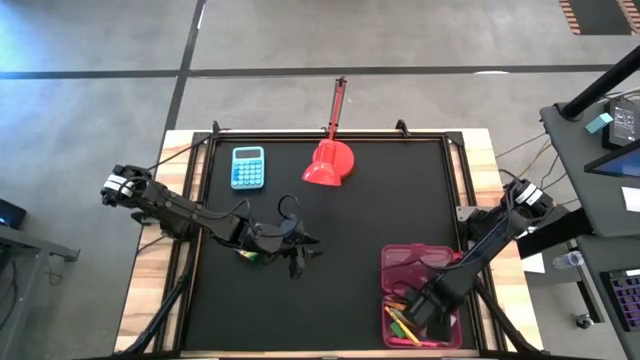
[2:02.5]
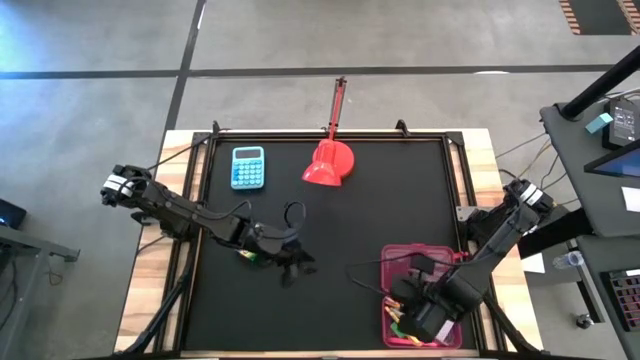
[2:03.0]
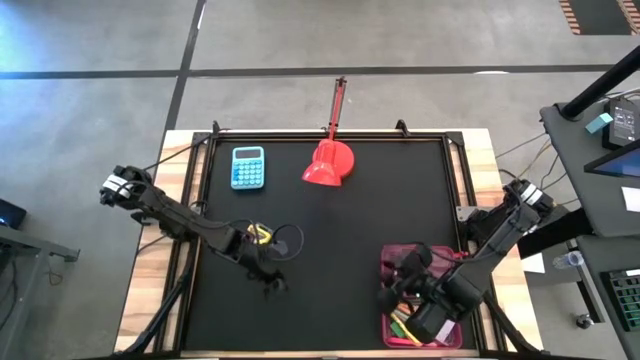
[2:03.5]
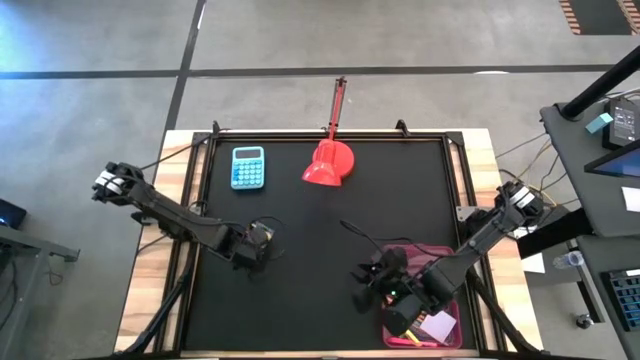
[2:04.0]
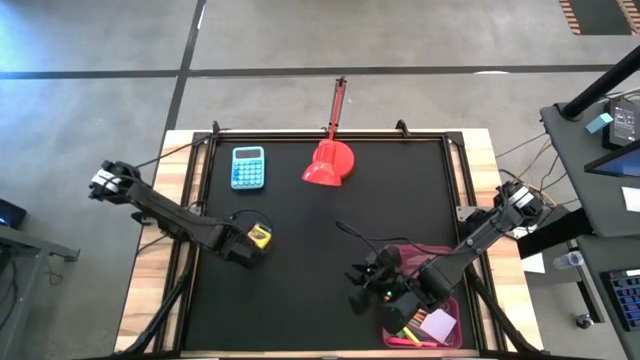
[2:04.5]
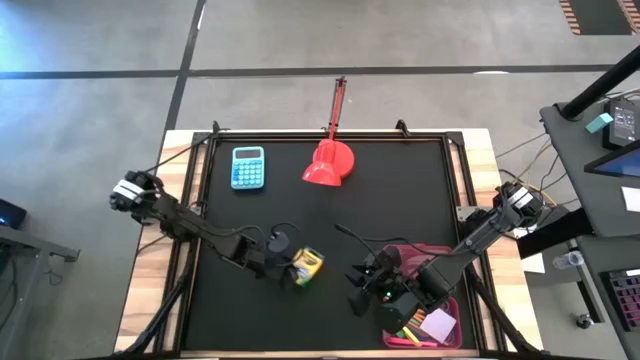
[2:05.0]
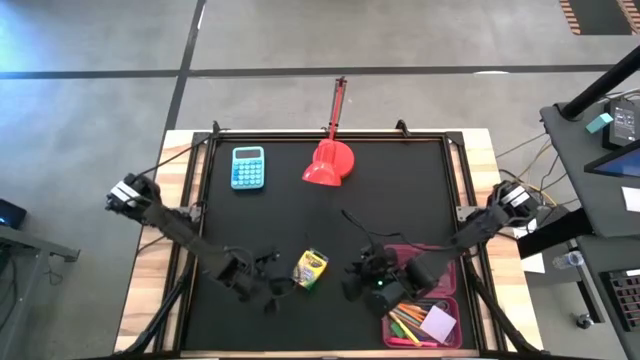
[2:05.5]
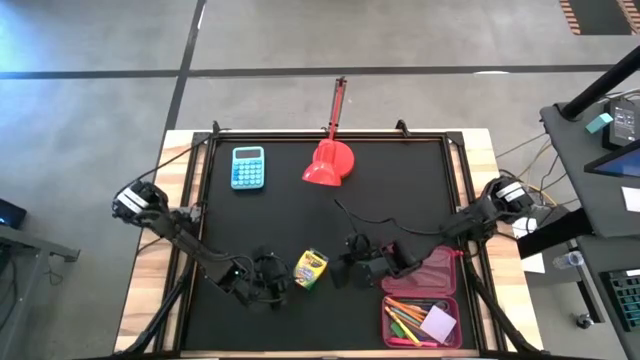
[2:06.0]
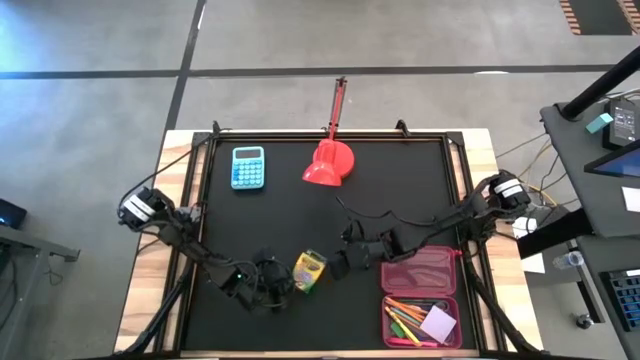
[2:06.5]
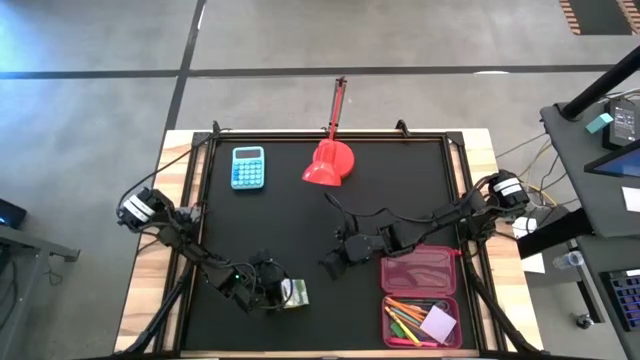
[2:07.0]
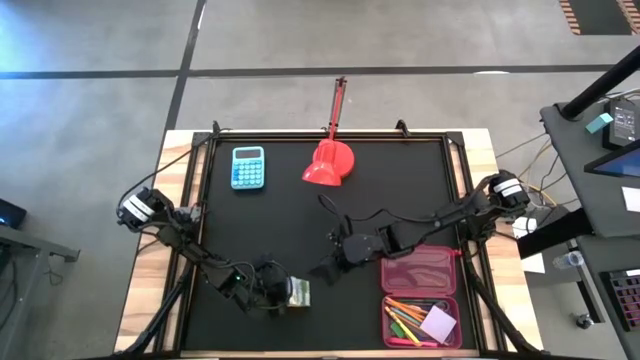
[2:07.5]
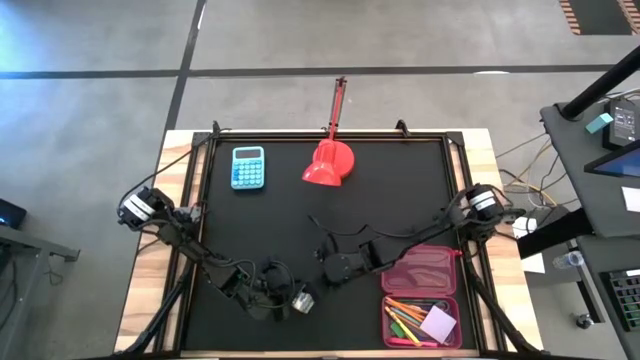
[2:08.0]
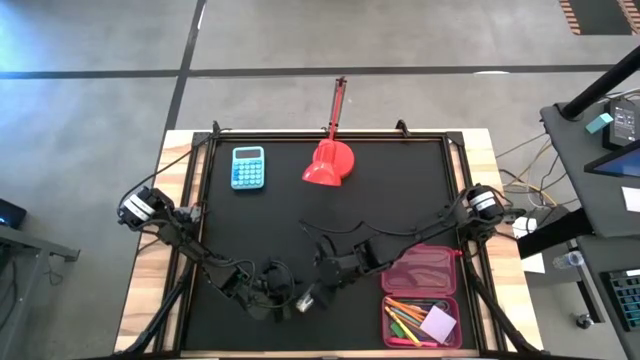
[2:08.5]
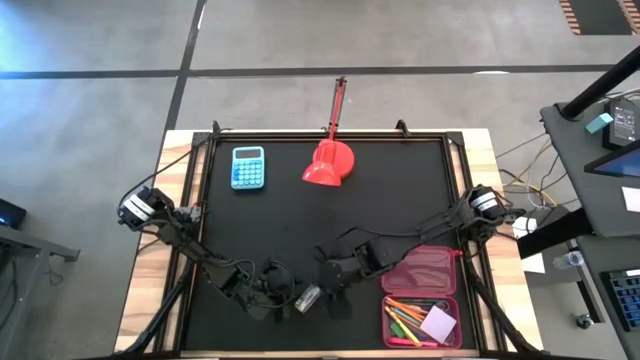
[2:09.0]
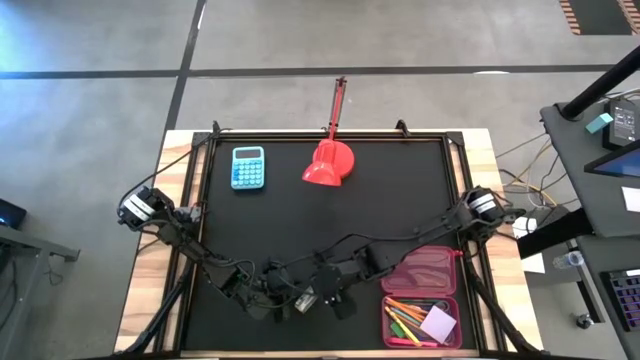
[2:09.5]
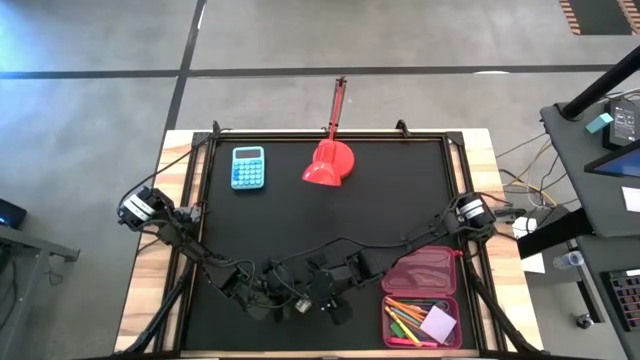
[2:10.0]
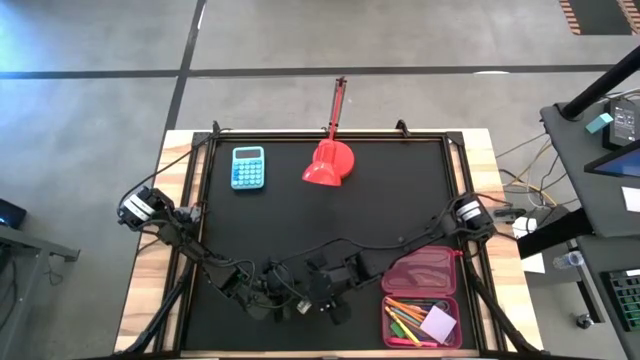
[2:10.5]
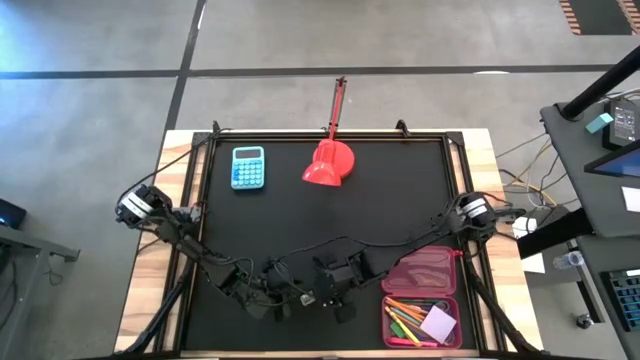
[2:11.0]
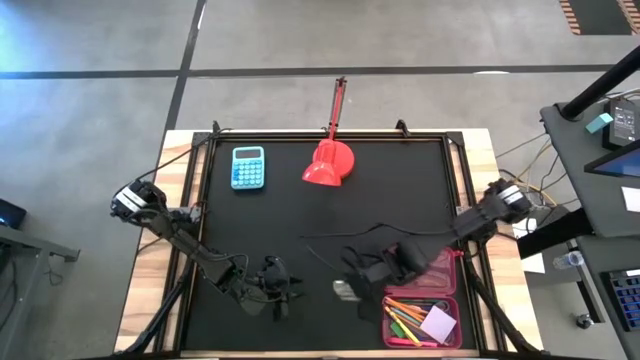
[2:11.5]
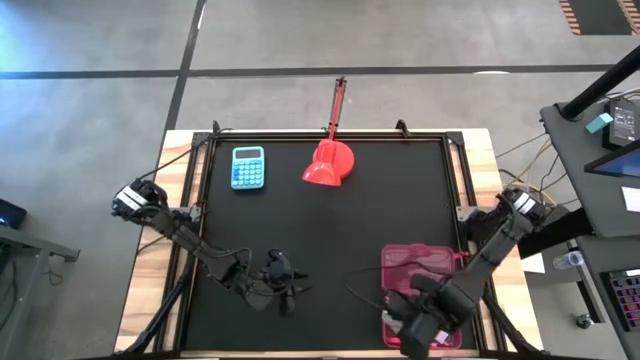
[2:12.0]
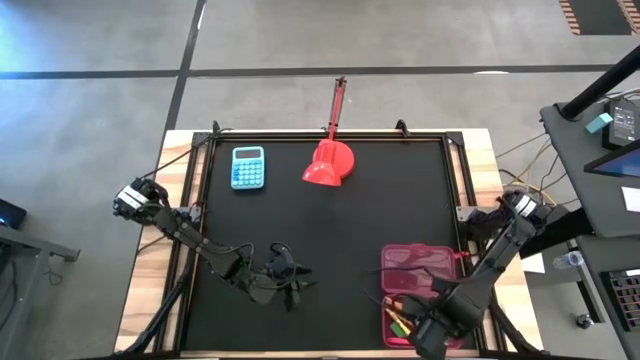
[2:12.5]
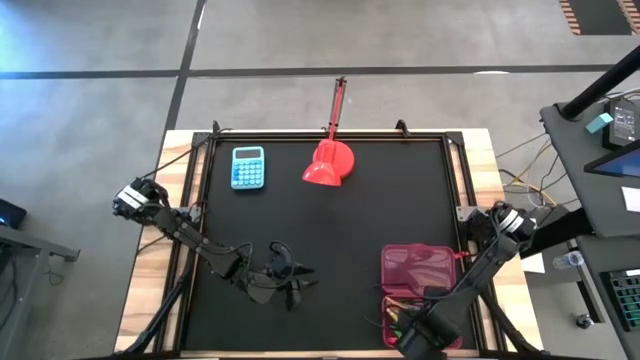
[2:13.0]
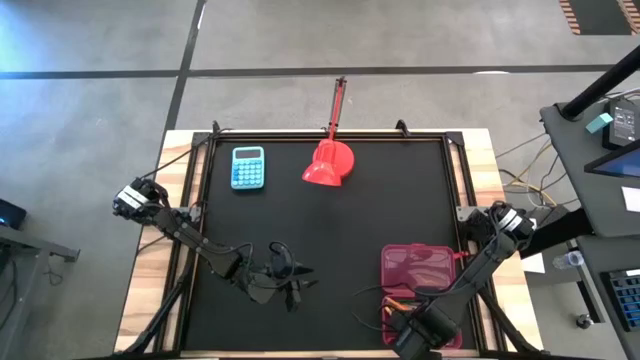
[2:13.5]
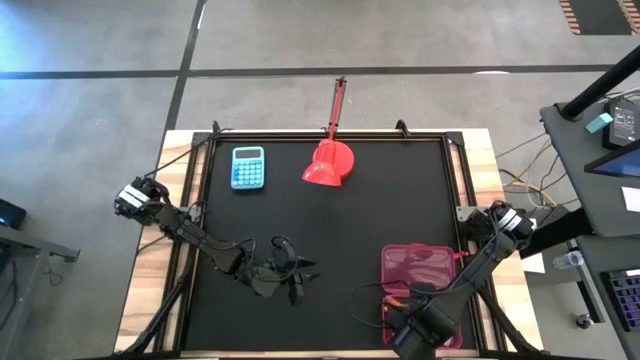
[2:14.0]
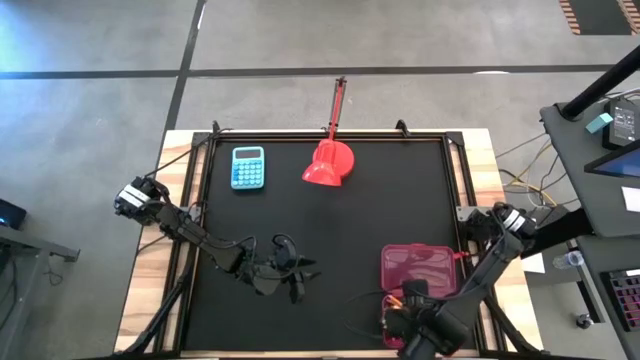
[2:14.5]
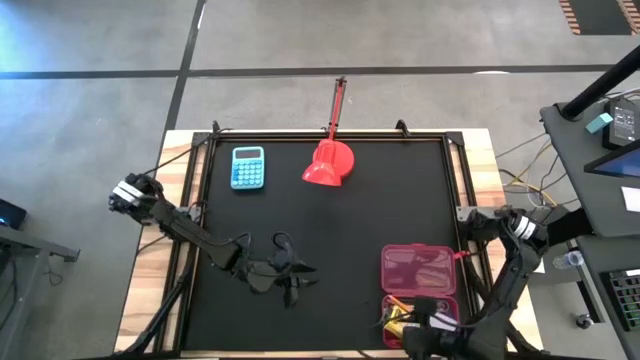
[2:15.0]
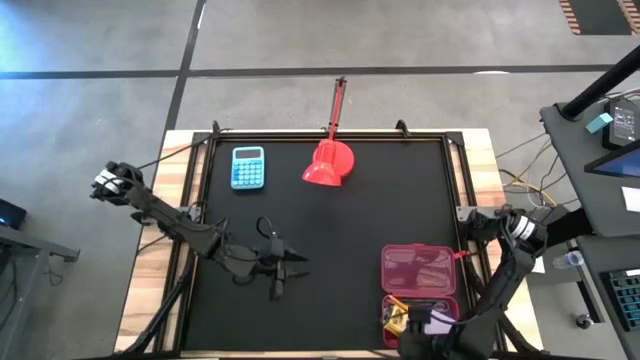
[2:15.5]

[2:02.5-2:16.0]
Task: Pack school essentials
Put the yellow crayon box into the pink supply box

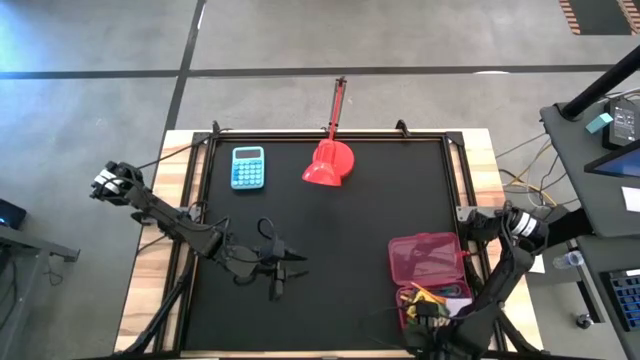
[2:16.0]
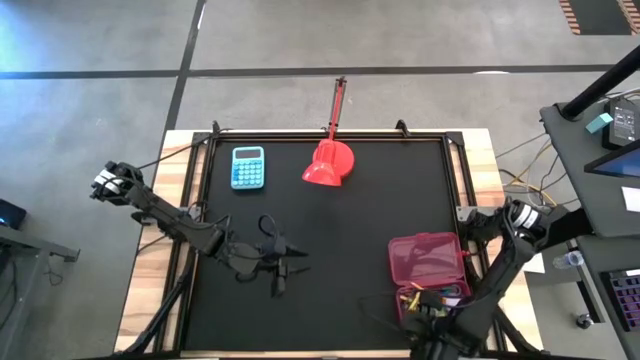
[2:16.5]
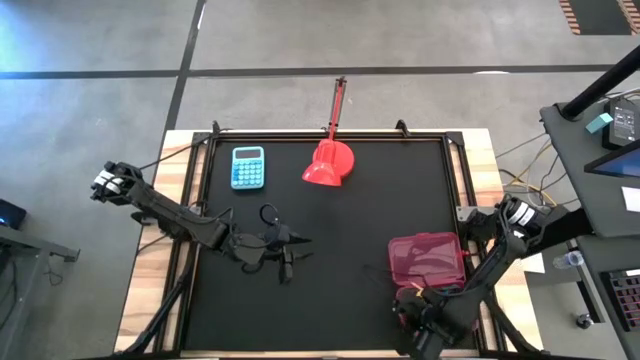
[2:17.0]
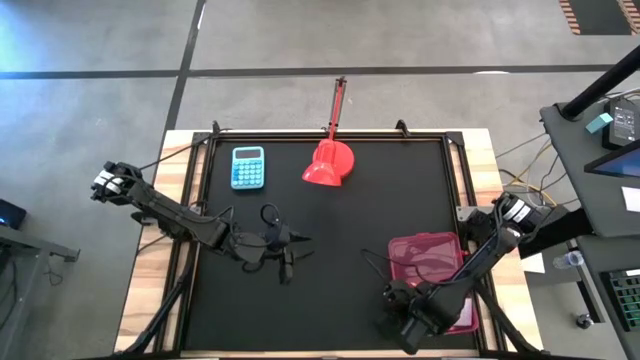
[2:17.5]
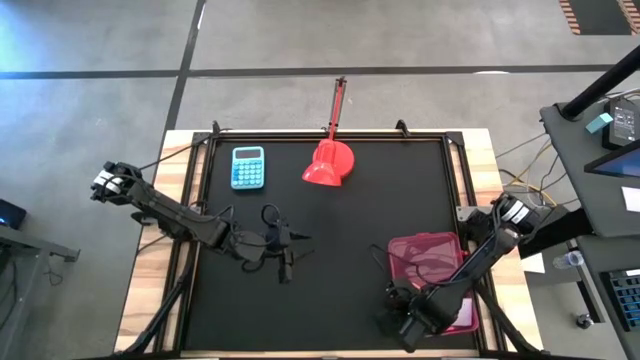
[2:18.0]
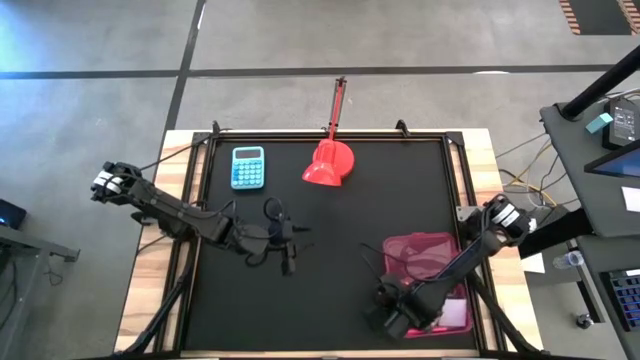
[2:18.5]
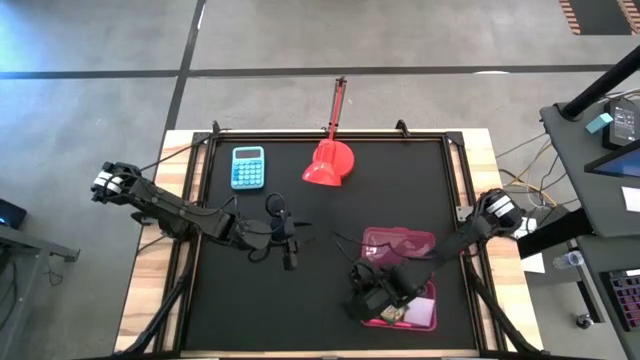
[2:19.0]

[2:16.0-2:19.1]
Move the pink supply box to the bottom center of the table

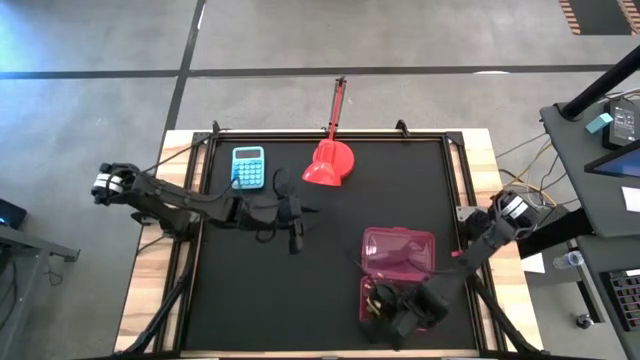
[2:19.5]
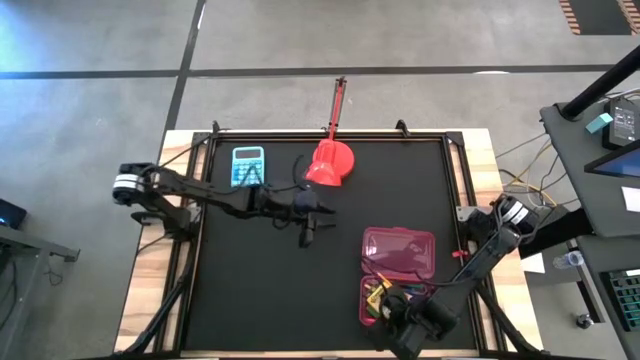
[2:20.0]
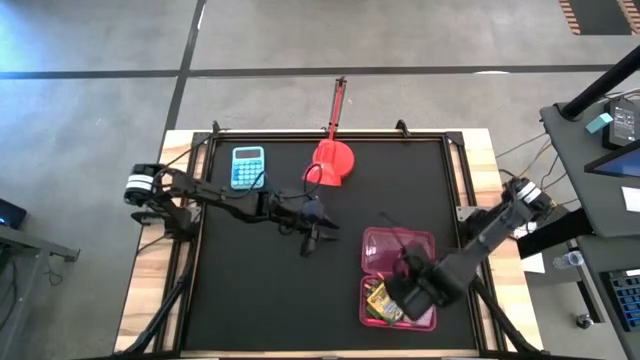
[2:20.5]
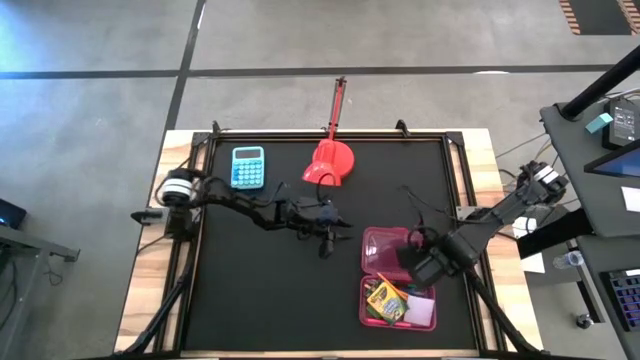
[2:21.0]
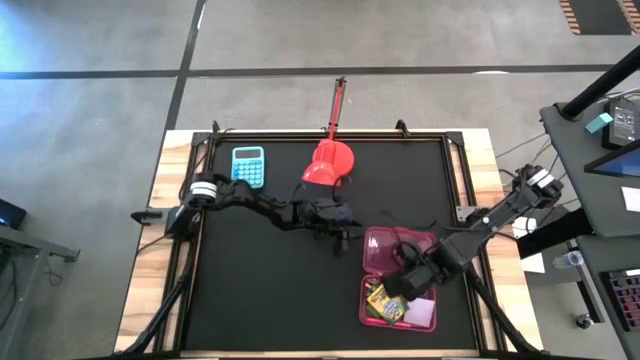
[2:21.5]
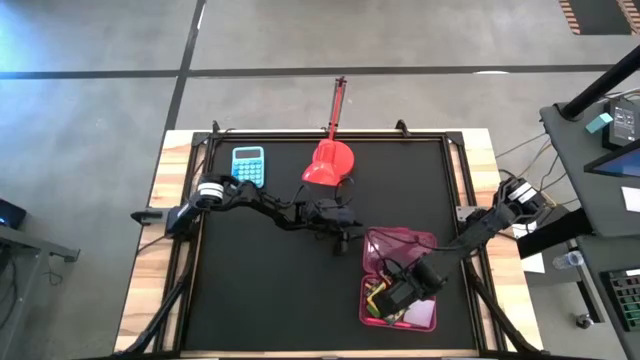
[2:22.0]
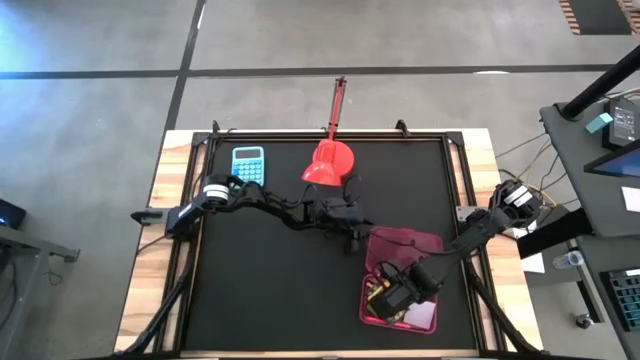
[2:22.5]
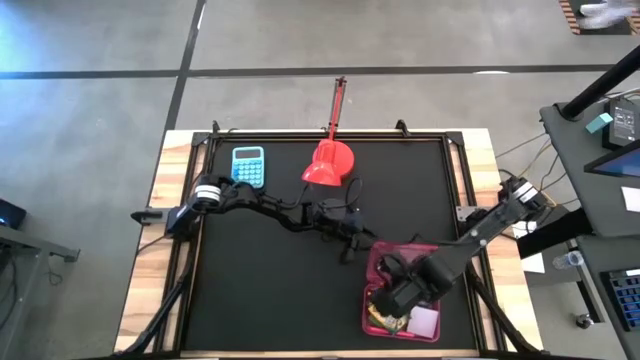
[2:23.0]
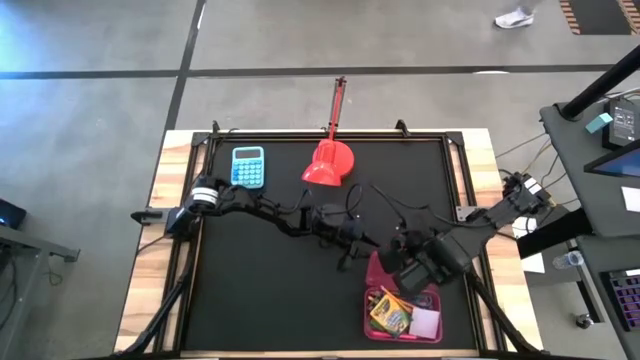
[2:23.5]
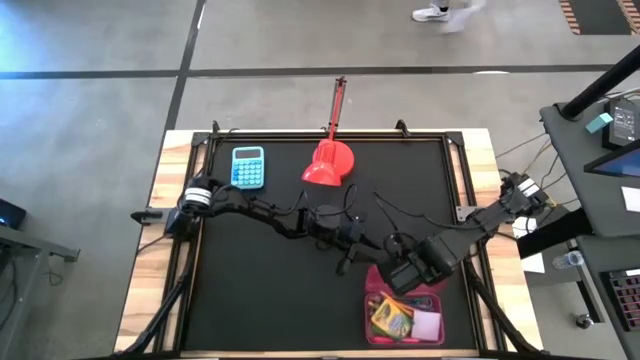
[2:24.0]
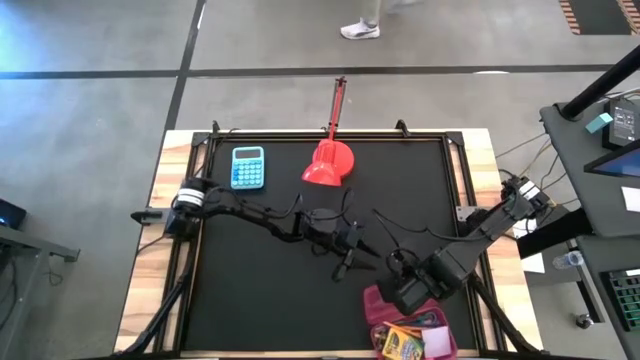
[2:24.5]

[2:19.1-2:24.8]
Close the pink supply box
